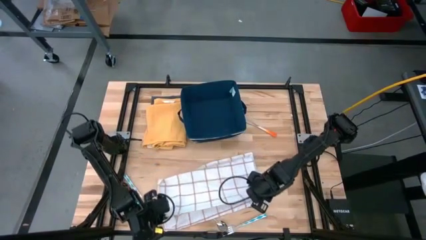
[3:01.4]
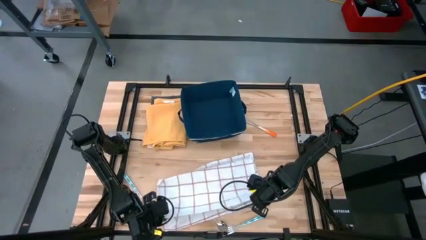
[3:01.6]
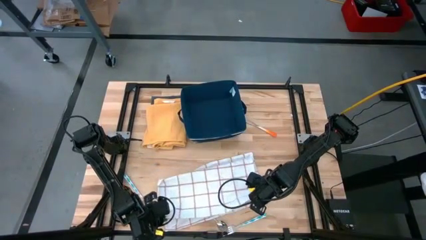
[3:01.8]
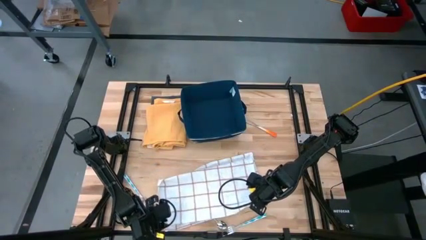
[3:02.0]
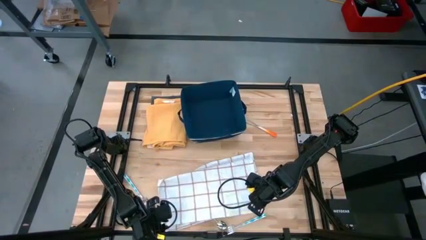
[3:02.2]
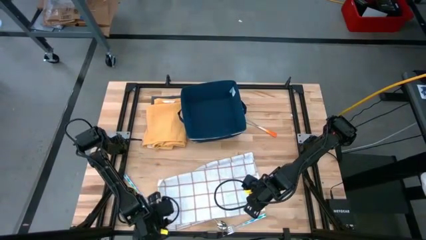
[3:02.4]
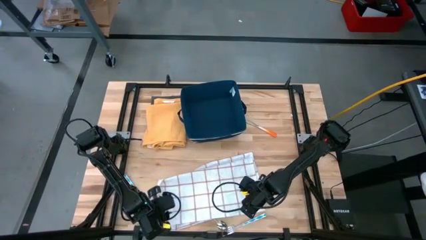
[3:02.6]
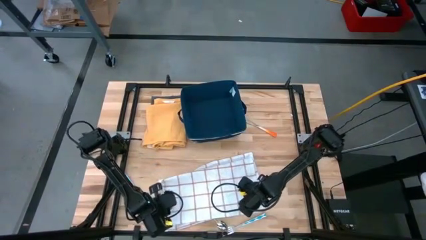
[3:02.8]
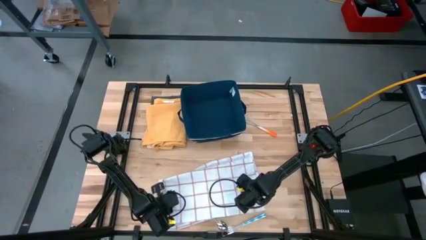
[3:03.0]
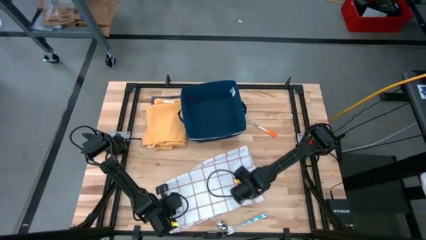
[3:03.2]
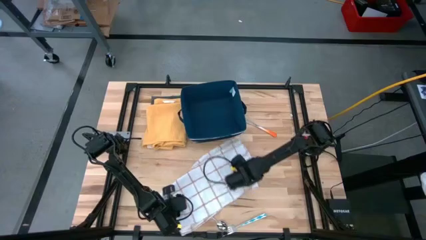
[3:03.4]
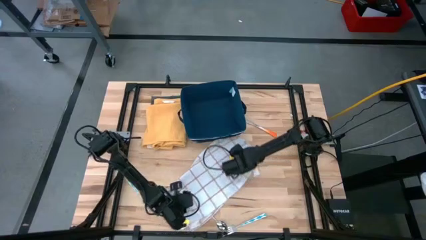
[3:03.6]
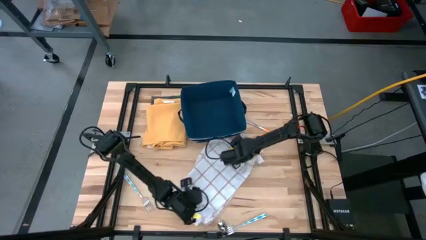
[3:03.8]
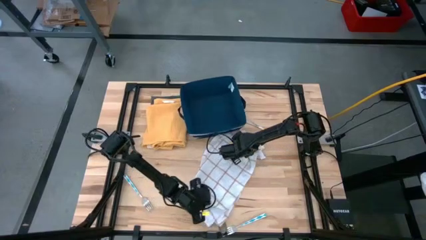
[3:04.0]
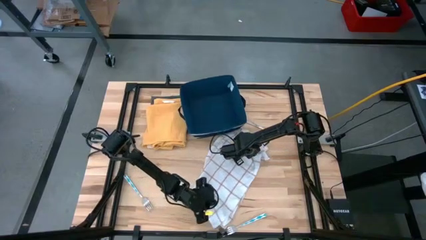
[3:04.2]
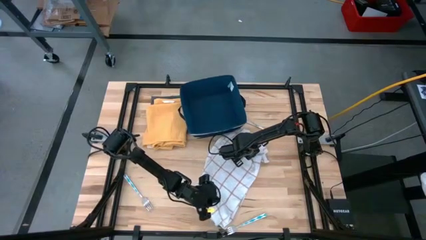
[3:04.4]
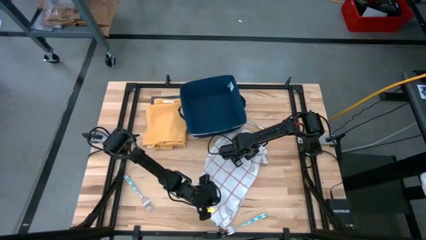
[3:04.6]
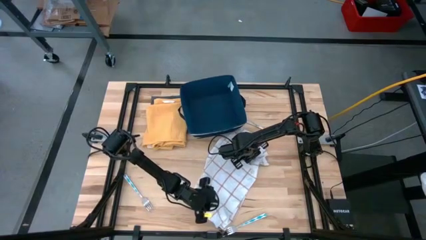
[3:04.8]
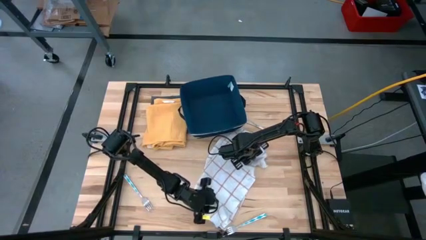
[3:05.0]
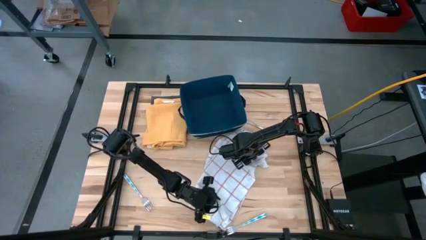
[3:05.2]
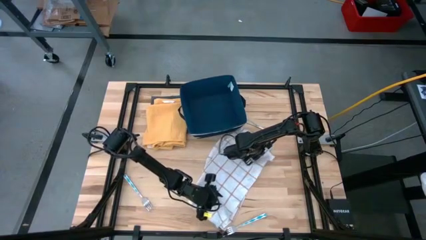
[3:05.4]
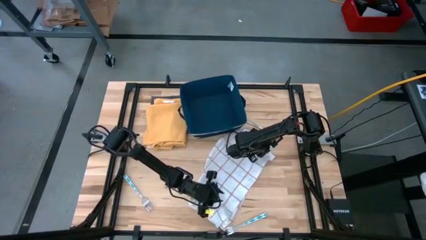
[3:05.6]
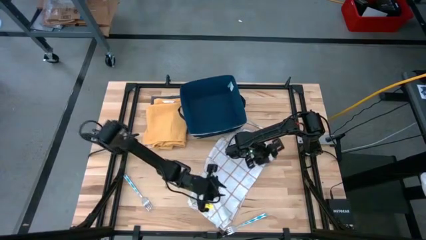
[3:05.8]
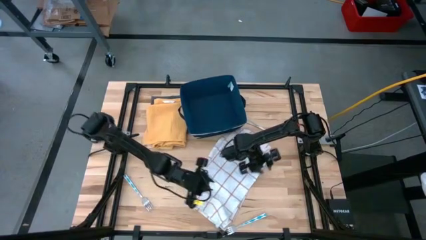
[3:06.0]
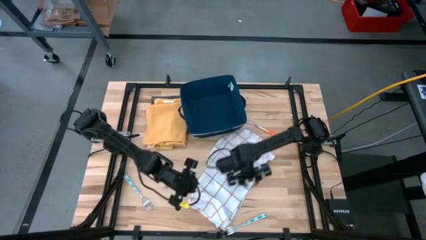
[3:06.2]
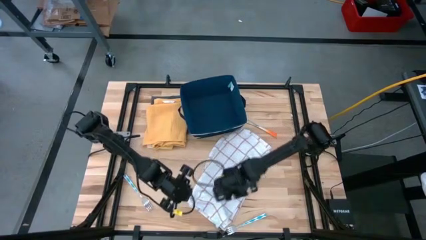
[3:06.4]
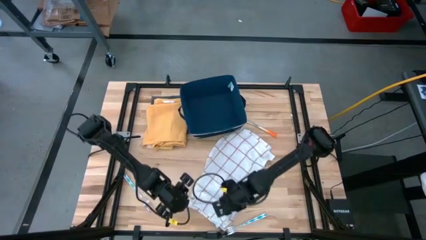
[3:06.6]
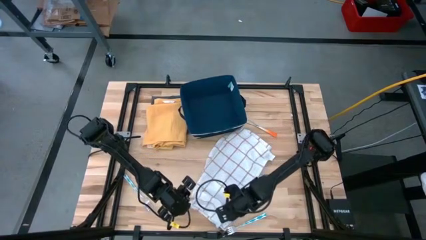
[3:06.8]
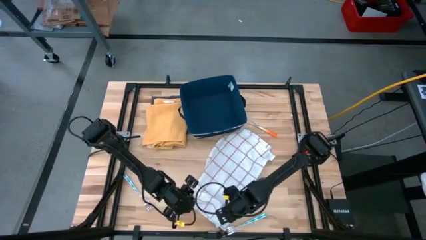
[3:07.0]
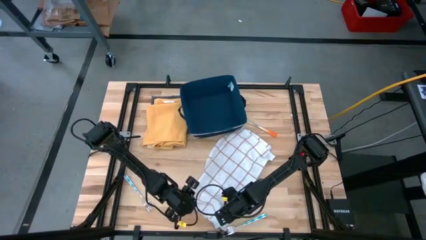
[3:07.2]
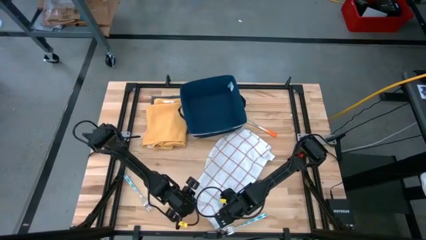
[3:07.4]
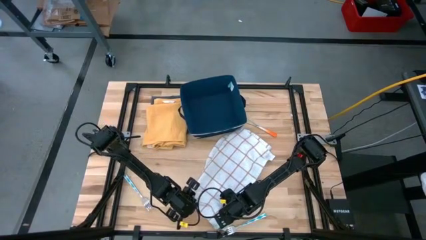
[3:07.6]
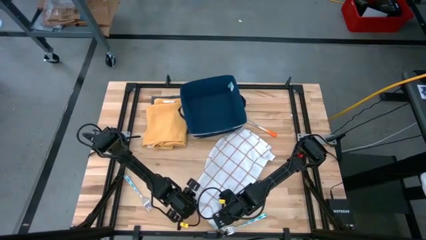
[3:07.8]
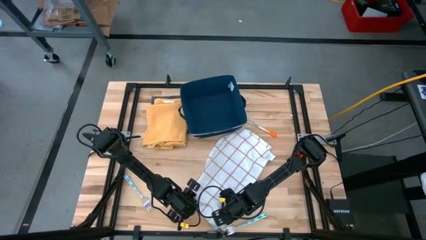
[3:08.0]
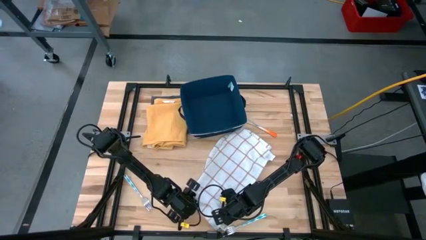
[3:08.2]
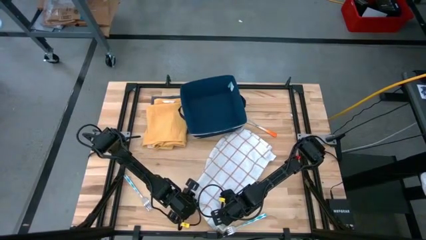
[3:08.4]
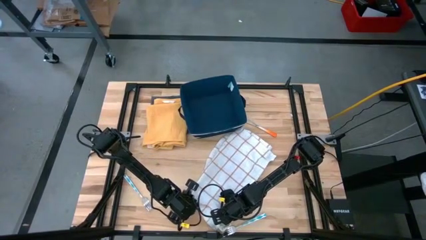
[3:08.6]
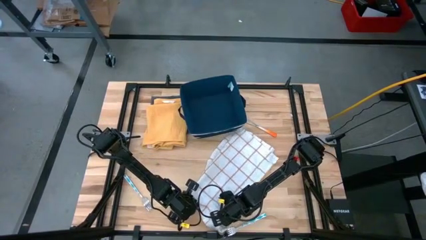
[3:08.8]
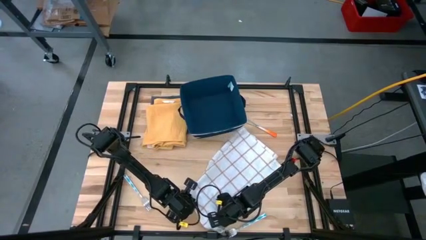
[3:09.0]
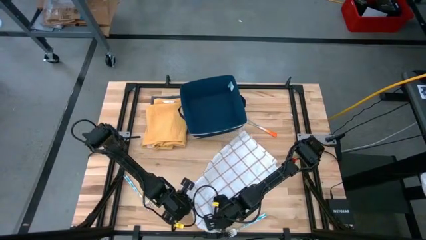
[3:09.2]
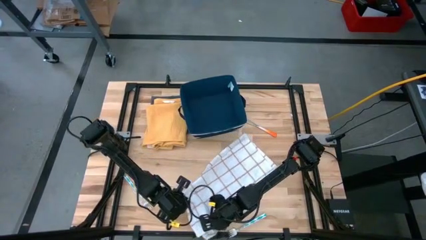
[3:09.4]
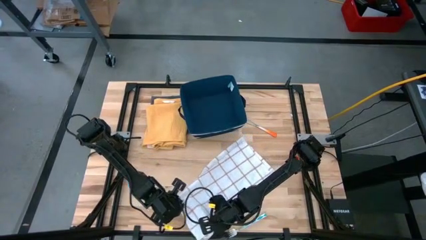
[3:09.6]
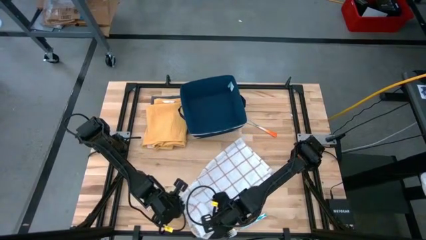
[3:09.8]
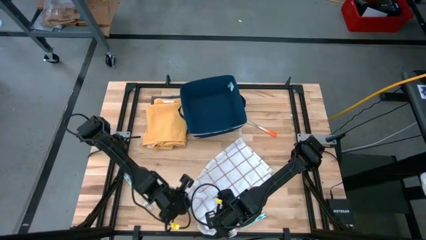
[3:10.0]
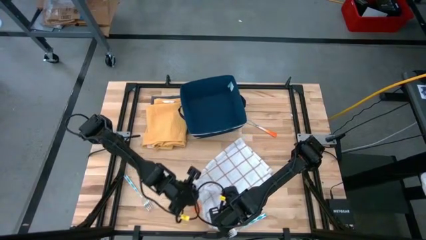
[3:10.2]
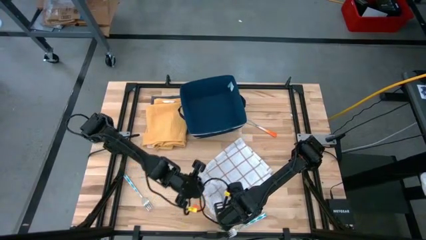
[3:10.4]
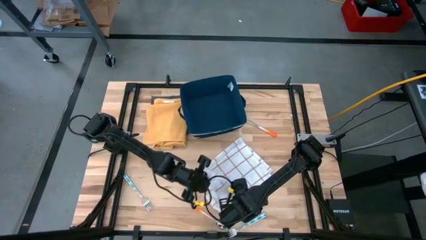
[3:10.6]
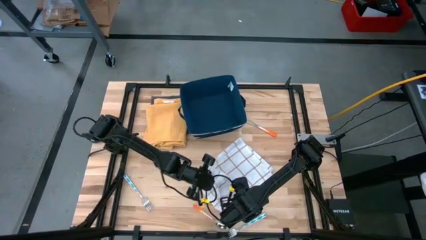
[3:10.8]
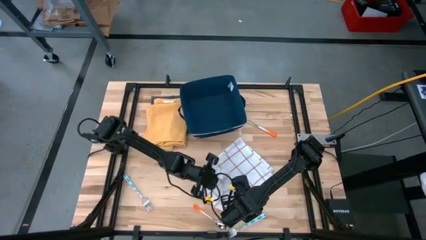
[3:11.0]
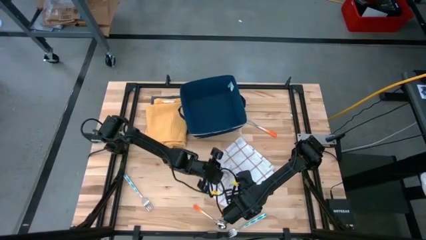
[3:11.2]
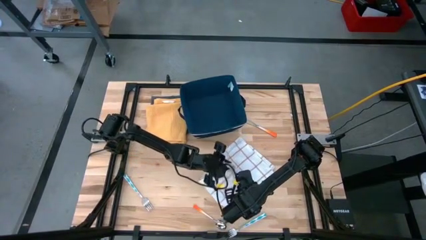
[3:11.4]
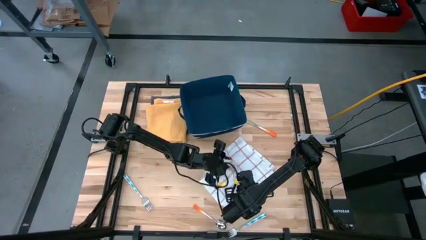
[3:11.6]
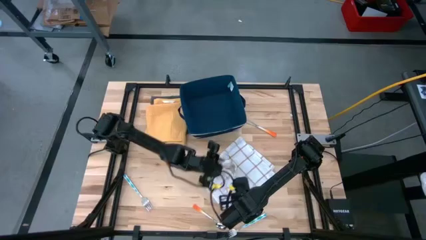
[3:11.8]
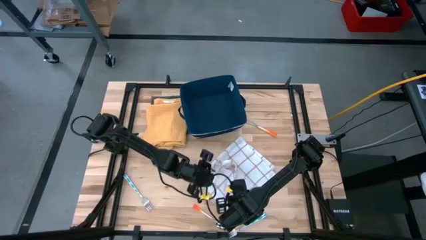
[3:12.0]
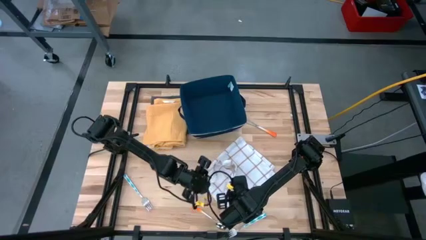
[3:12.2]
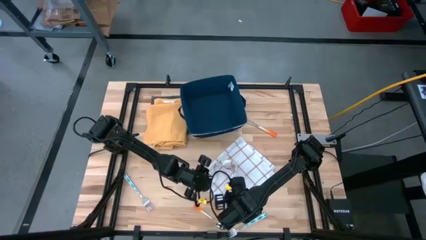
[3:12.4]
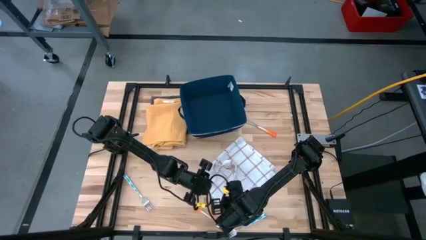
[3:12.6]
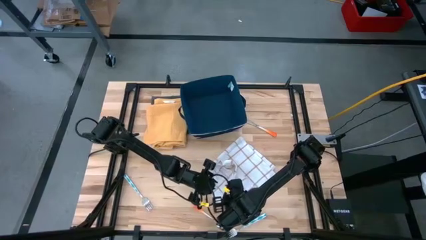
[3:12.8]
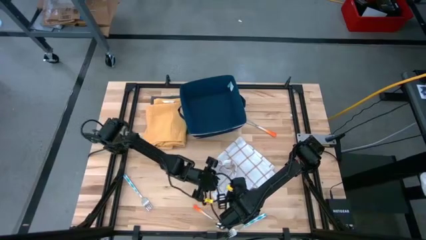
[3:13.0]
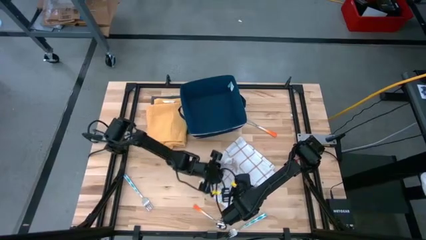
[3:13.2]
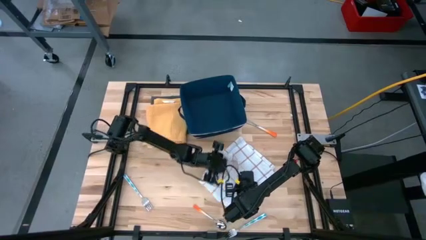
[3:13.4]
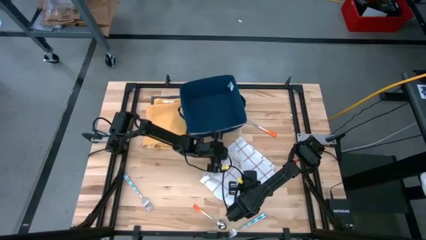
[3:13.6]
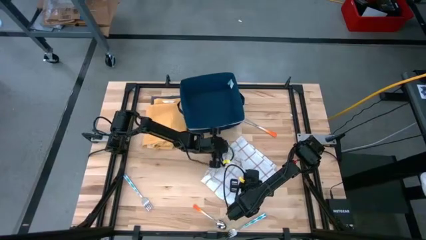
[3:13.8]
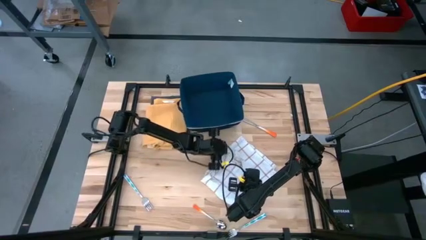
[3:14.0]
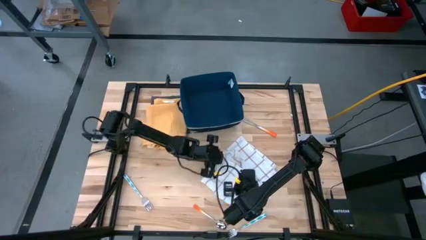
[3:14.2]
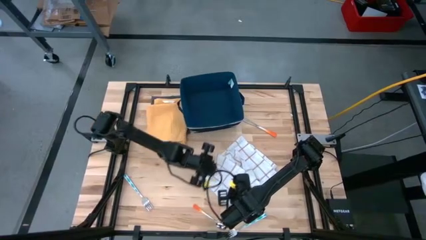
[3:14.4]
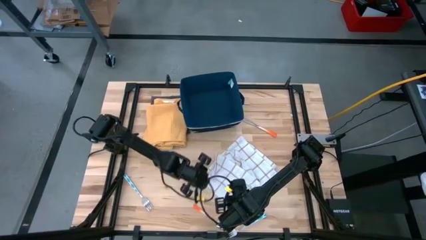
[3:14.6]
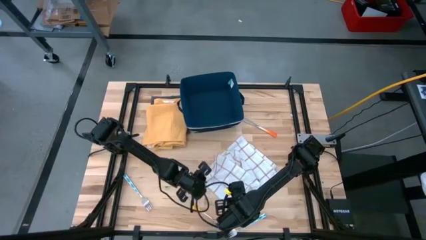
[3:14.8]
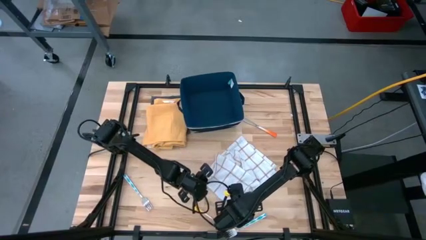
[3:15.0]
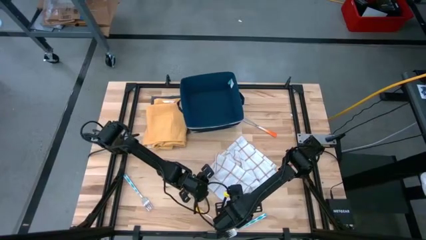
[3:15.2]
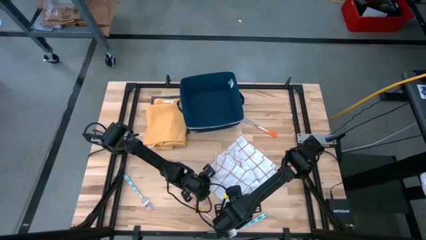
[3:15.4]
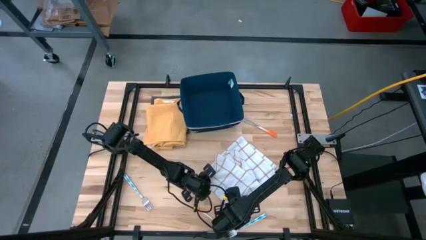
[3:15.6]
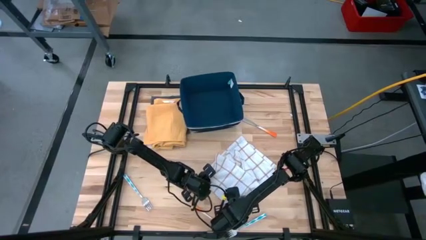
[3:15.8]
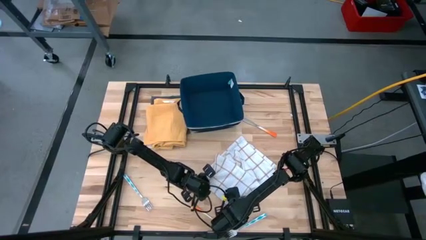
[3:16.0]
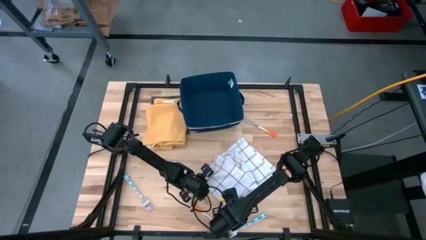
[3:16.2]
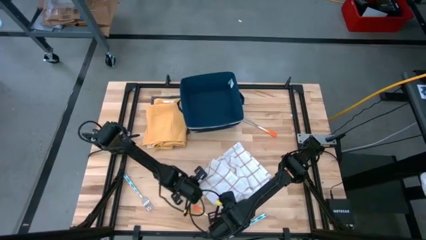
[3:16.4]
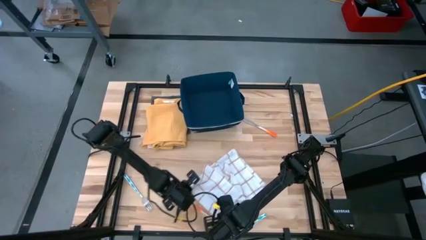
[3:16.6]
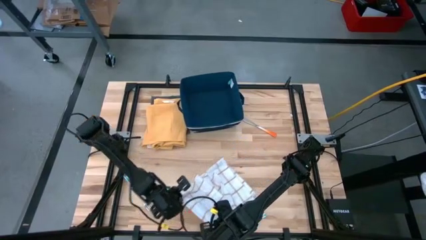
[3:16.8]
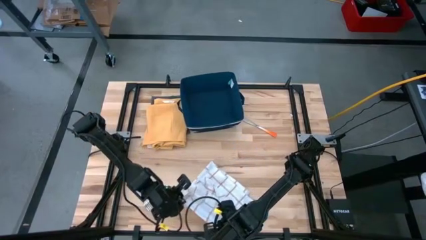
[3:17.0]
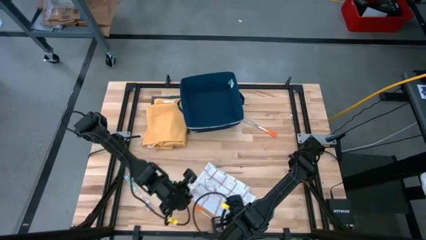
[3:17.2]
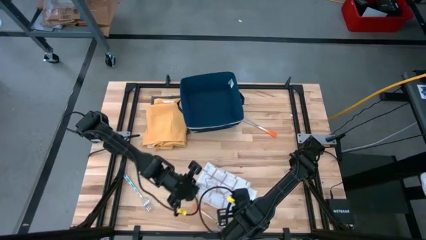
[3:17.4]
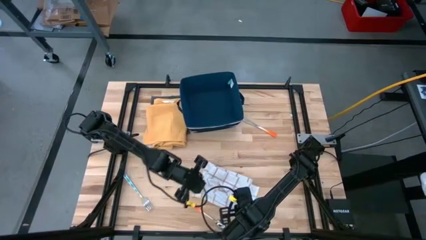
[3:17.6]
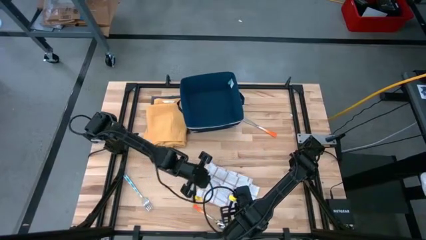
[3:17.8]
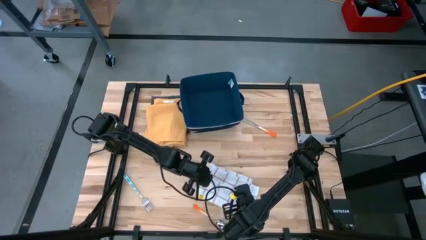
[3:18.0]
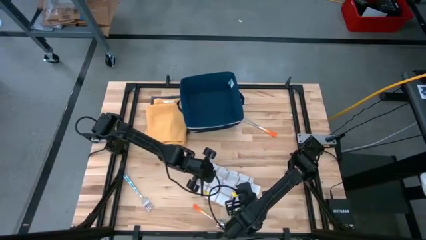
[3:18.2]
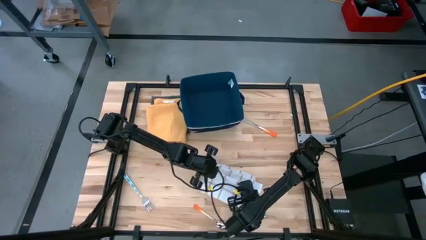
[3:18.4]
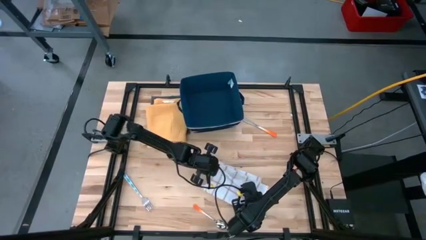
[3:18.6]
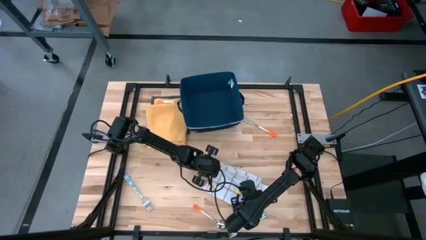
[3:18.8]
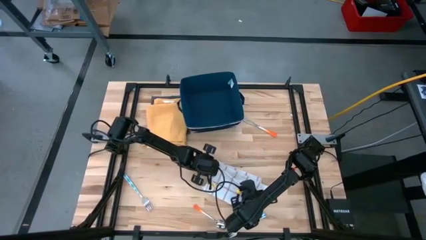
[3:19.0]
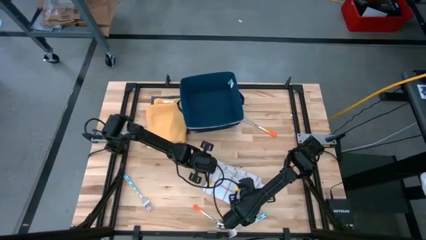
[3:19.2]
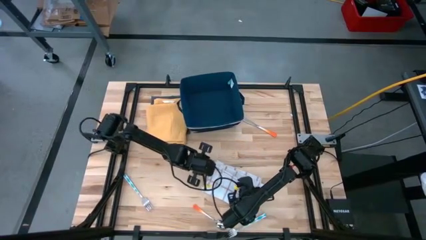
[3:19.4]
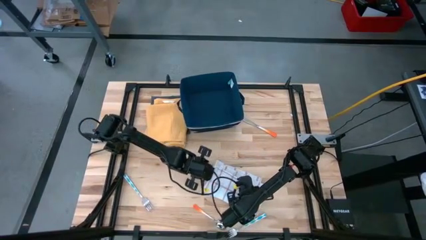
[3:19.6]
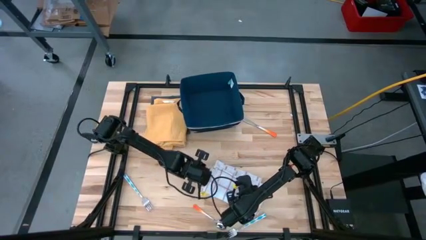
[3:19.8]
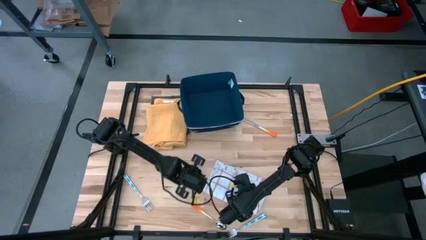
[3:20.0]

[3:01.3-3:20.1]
Task: Fold towel
Fold the white pattern towel
